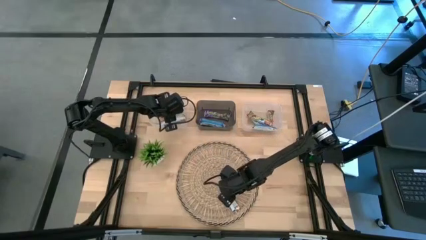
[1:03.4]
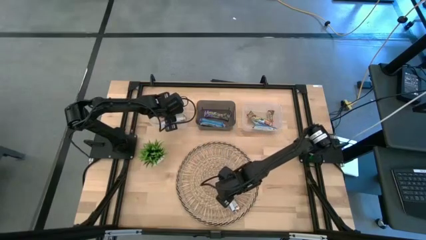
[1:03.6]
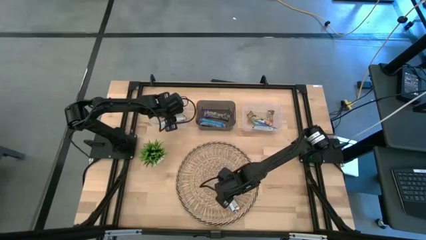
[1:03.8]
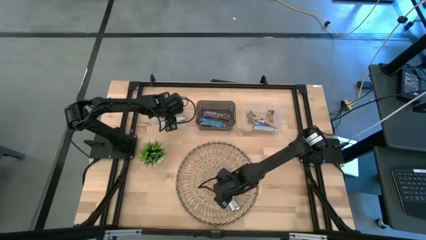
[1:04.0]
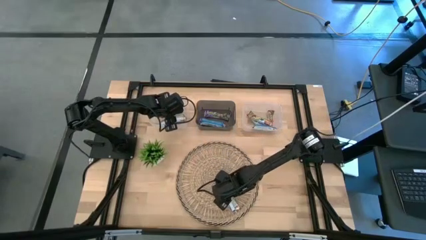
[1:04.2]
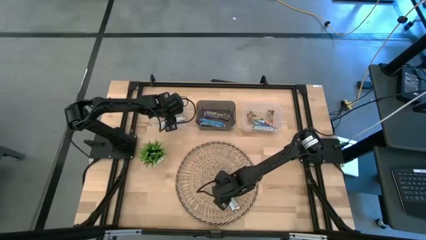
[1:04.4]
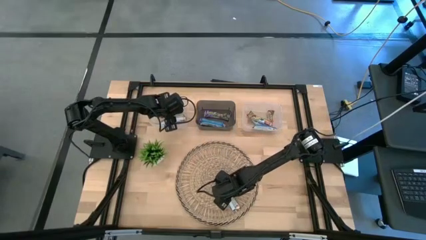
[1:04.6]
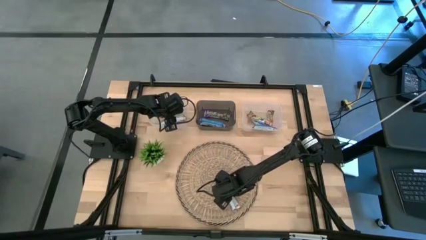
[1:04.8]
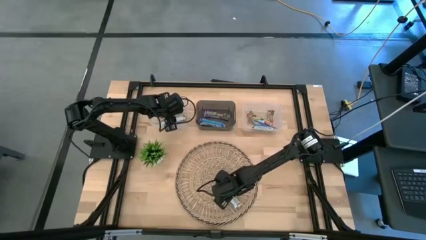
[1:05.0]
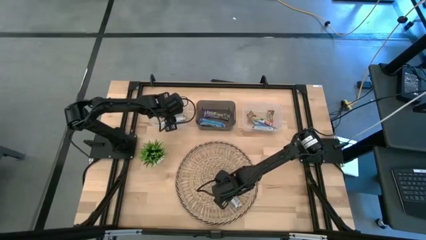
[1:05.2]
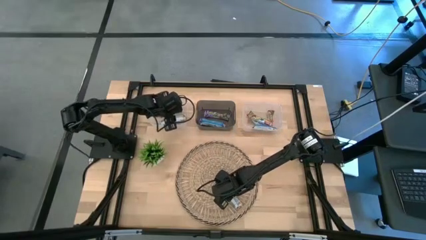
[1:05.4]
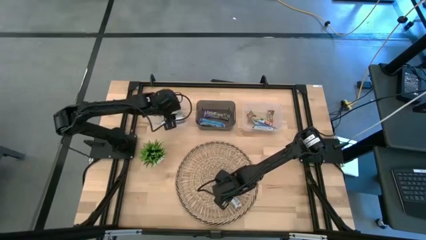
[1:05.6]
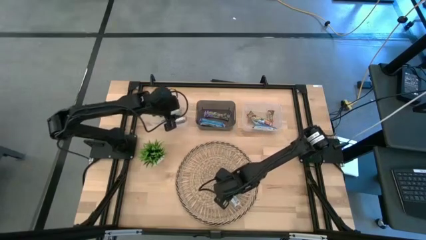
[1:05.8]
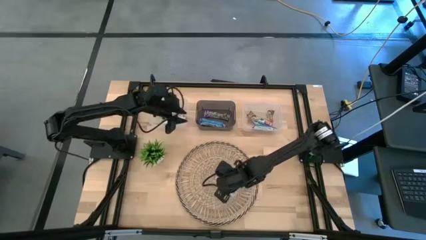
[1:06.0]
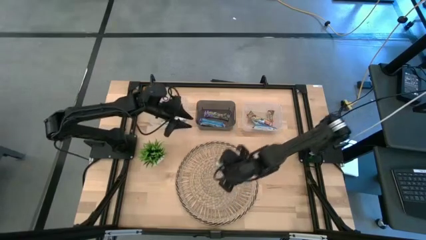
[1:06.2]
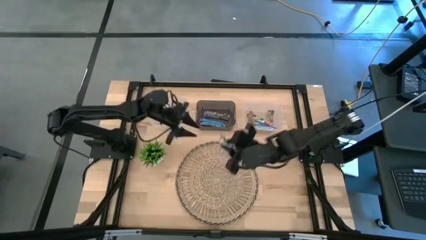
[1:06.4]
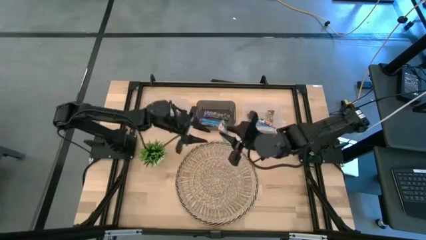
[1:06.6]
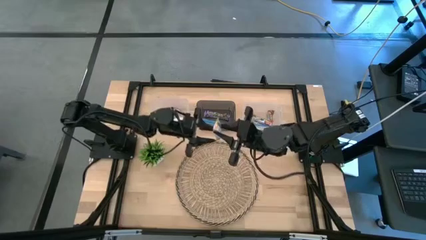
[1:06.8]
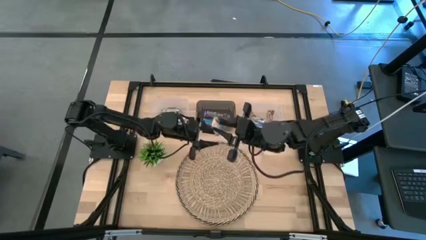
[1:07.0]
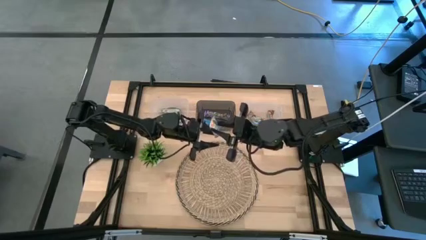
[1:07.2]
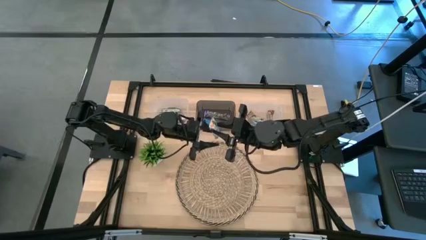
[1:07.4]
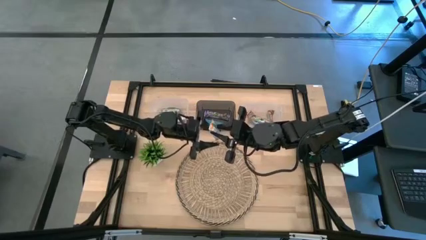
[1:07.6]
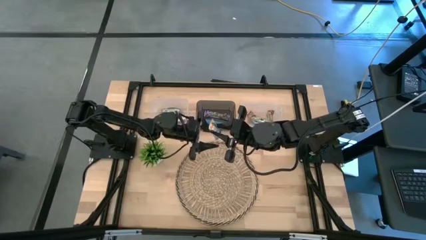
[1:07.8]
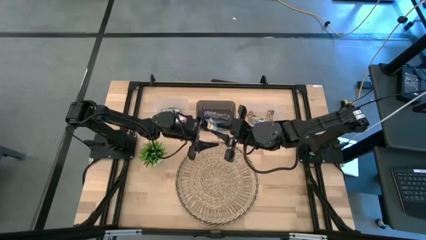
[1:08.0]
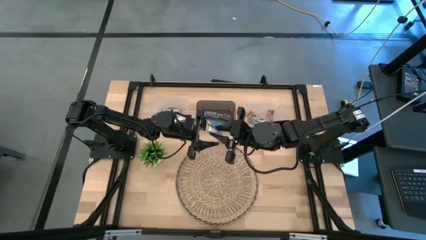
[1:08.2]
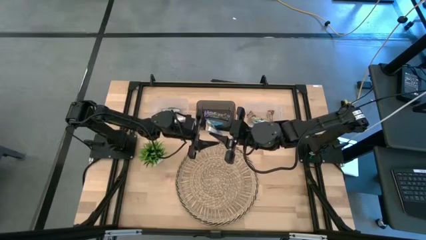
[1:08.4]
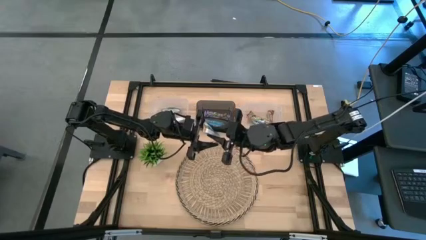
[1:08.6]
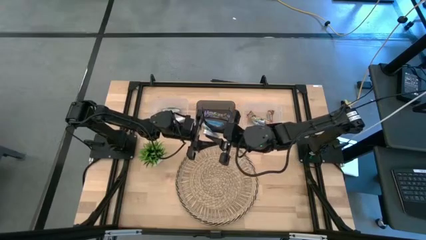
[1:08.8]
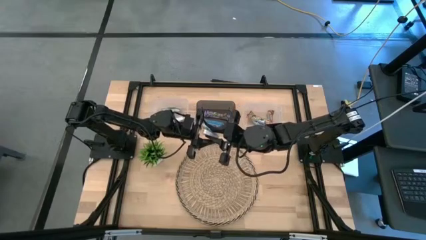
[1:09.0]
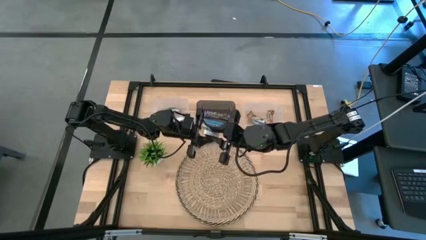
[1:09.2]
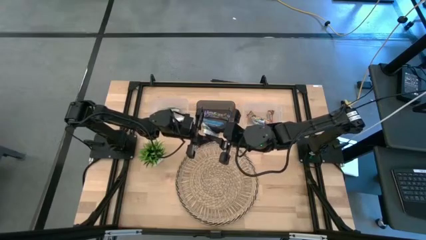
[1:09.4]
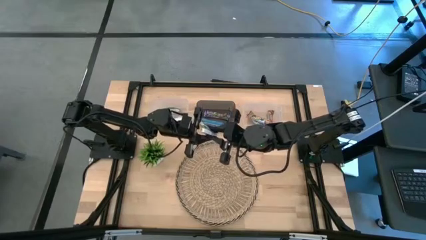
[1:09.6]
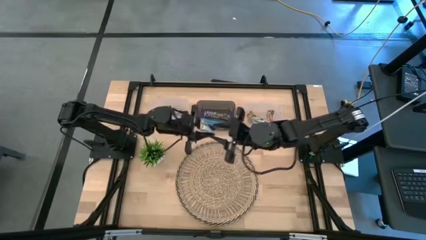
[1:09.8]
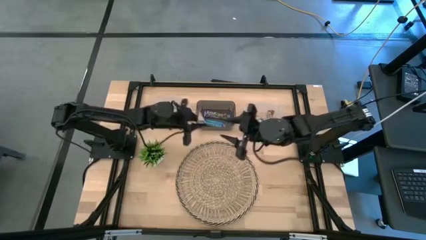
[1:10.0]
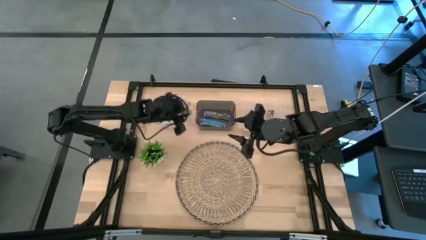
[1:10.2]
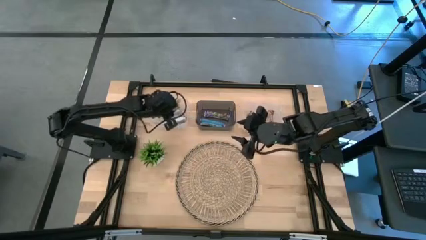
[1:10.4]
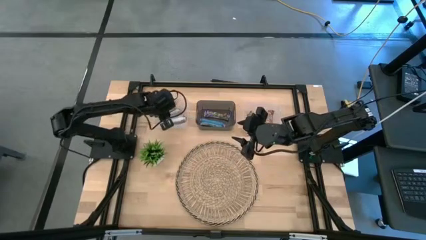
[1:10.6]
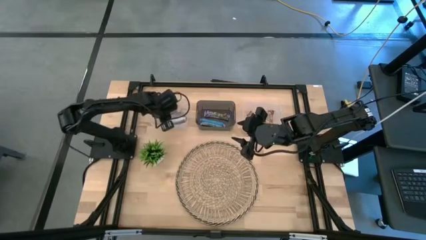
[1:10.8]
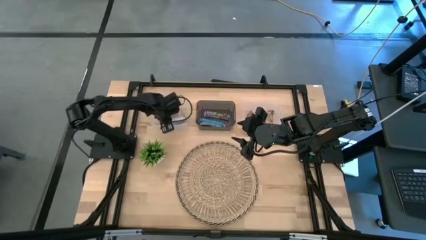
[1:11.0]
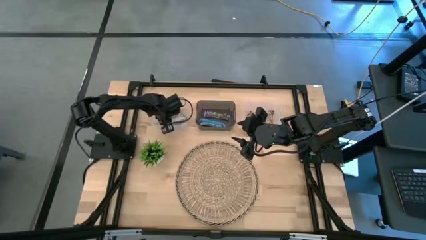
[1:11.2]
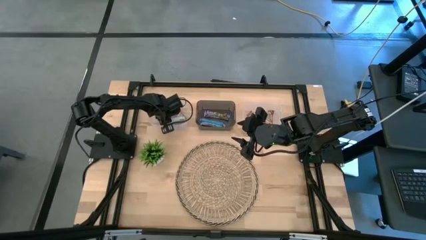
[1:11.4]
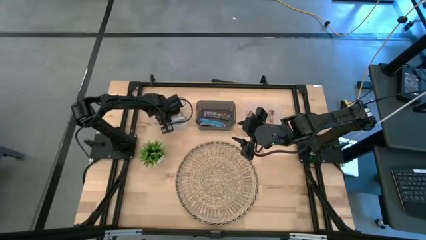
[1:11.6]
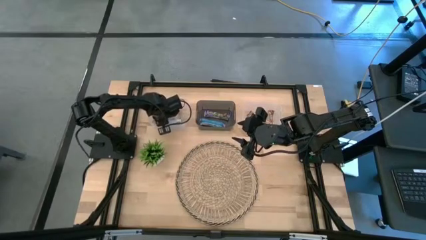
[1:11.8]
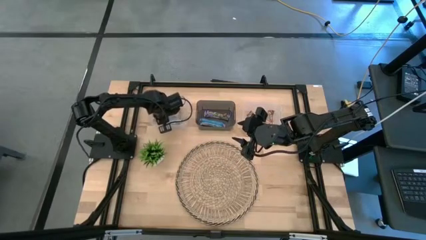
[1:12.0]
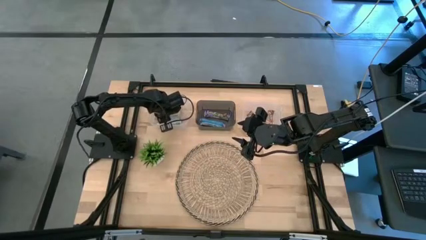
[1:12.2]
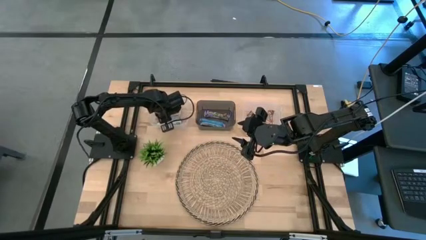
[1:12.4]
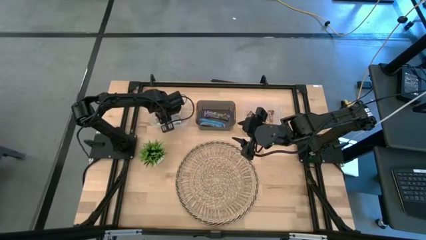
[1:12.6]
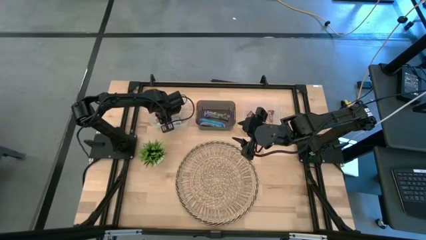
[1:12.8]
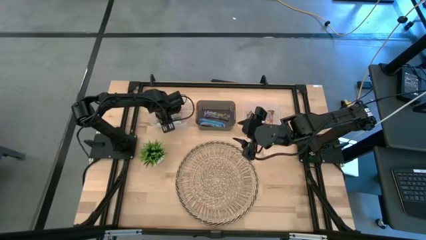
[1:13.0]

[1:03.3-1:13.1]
Task: Pick and place Granola Bars by type
Put the yellow granola bar into the left transparent bin

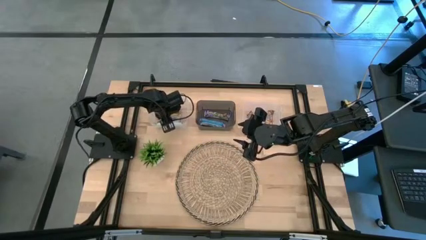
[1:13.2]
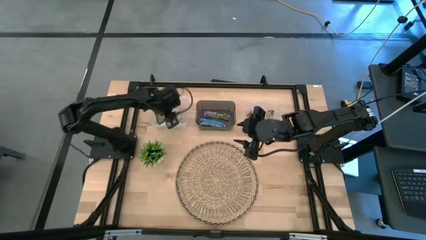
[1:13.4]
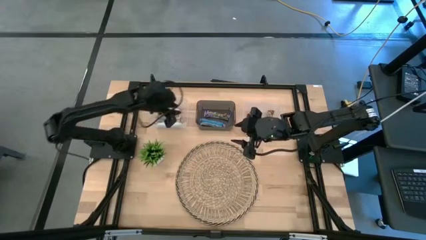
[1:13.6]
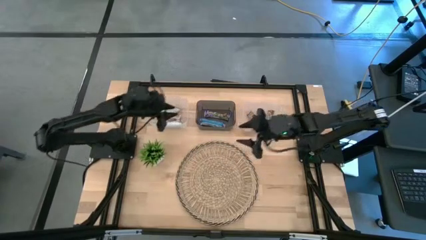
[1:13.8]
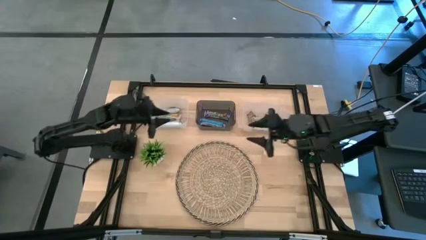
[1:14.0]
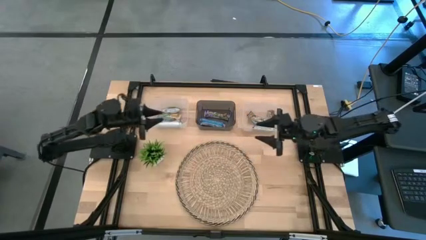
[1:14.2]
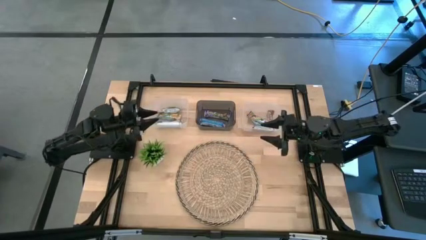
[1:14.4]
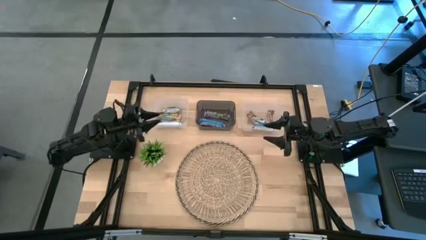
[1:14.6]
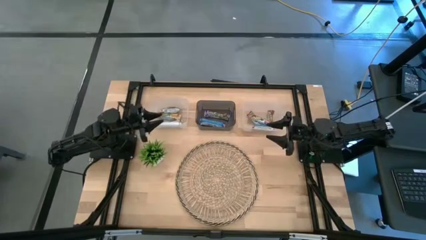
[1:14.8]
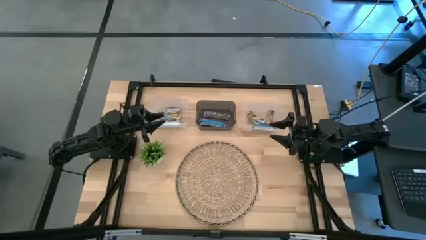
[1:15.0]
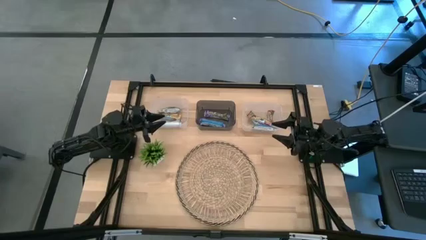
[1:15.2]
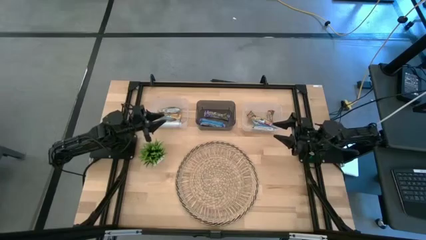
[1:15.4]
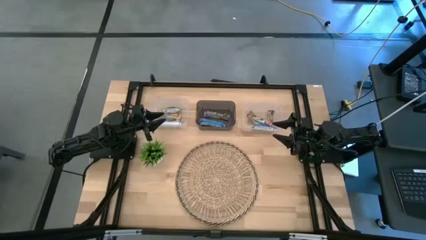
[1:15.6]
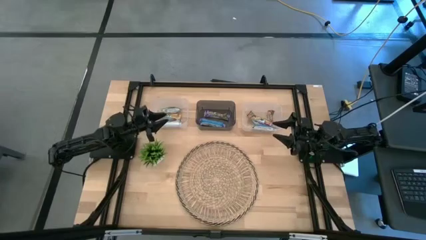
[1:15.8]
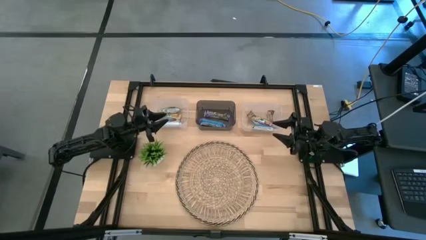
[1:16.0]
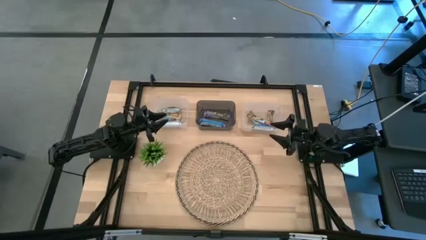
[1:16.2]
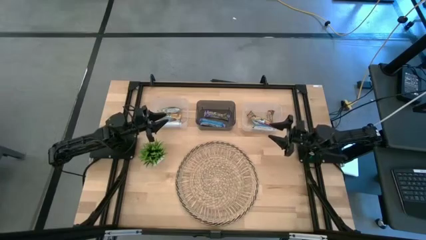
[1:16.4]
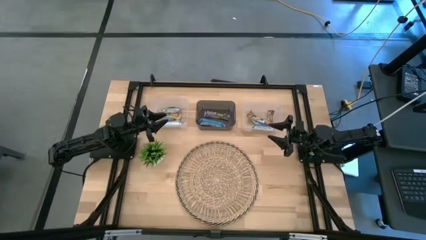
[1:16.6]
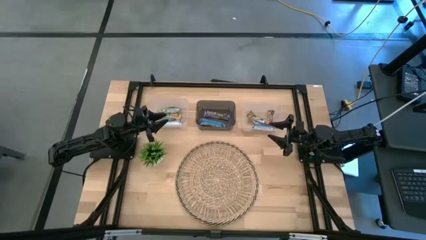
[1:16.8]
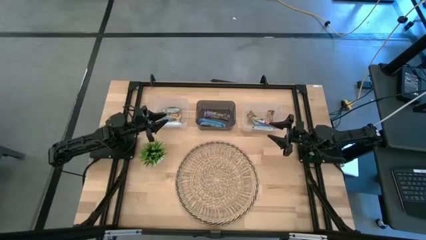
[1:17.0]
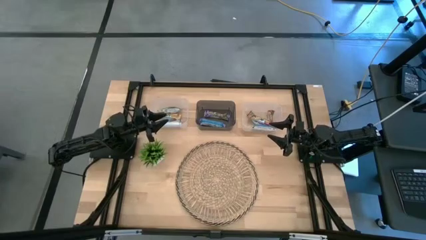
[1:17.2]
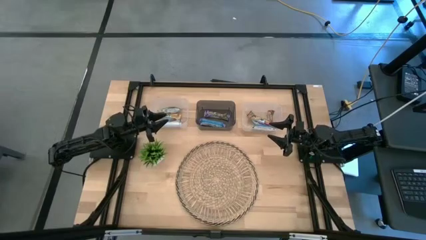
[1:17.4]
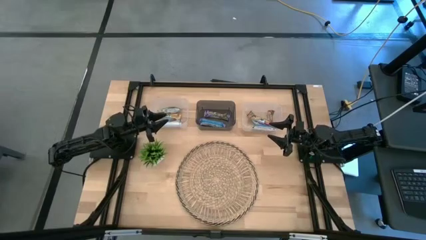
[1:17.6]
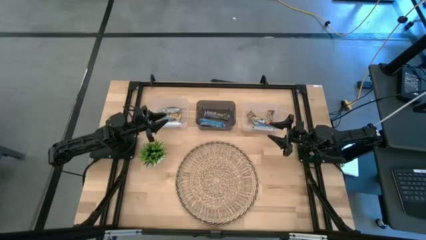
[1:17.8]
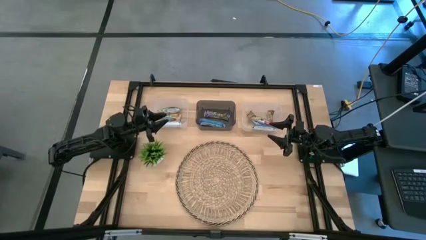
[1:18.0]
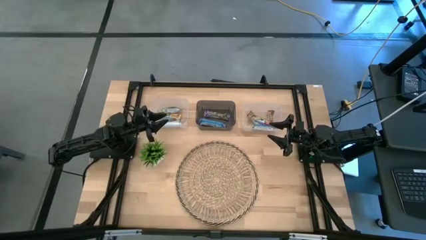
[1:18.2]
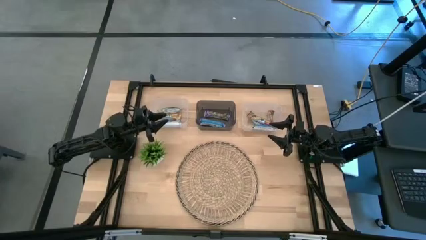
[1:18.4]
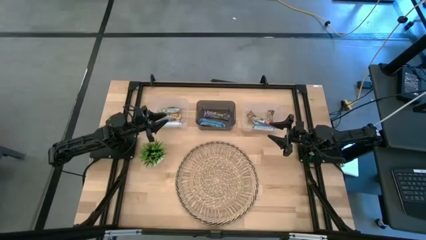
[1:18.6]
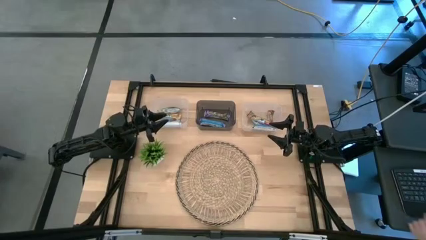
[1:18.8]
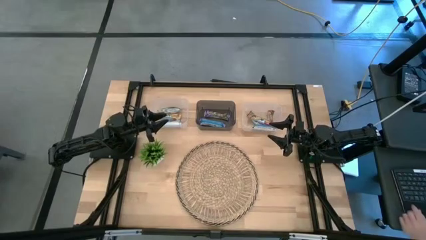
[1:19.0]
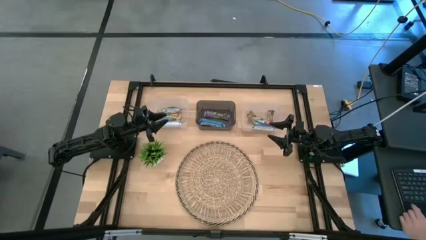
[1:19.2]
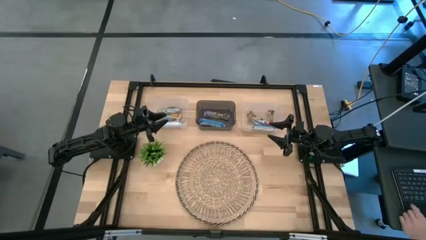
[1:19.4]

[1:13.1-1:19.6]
Return to Home Position
